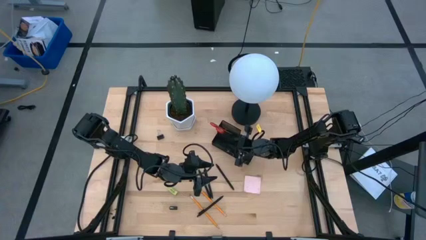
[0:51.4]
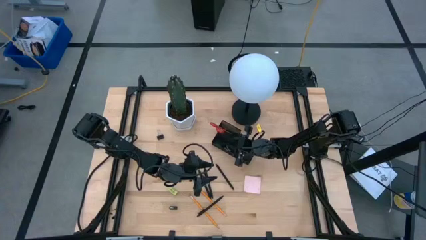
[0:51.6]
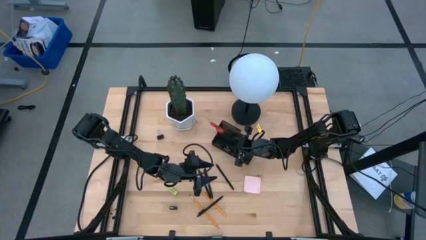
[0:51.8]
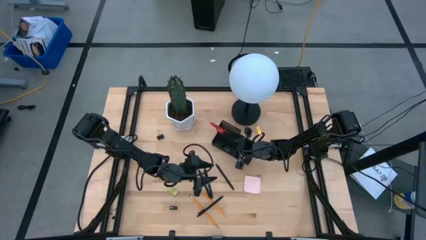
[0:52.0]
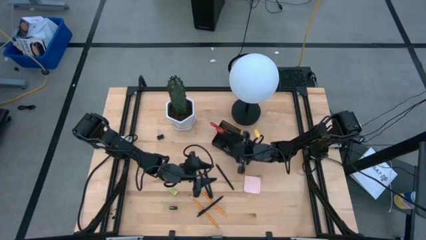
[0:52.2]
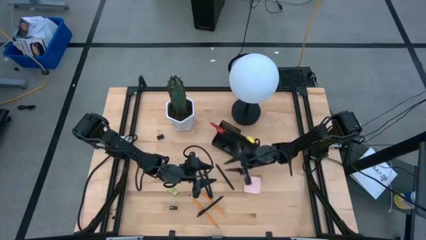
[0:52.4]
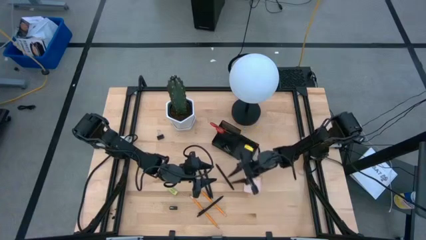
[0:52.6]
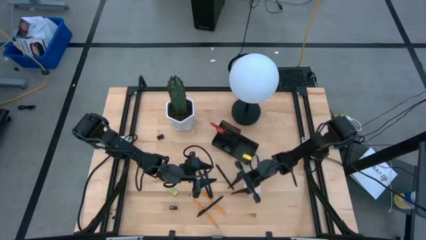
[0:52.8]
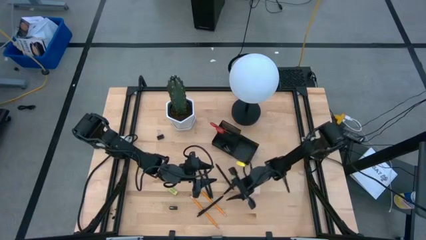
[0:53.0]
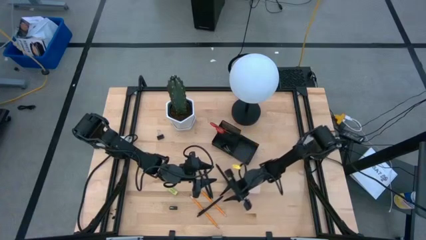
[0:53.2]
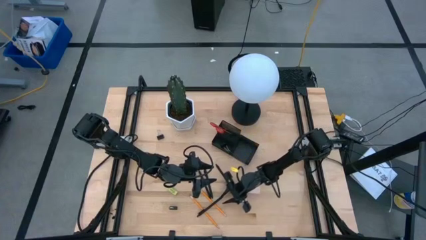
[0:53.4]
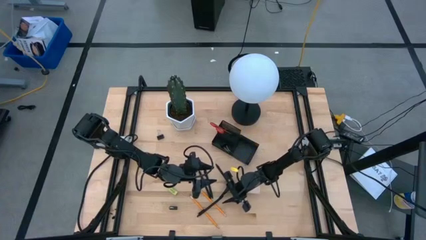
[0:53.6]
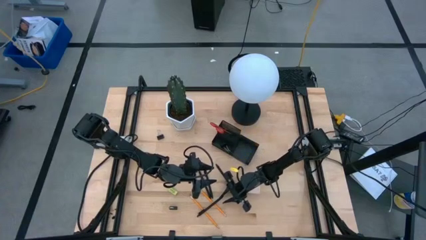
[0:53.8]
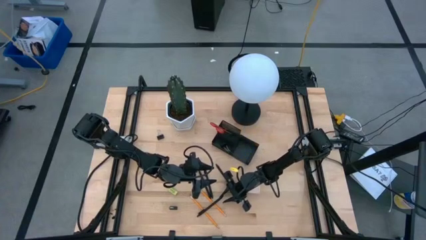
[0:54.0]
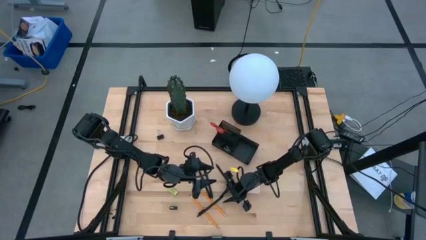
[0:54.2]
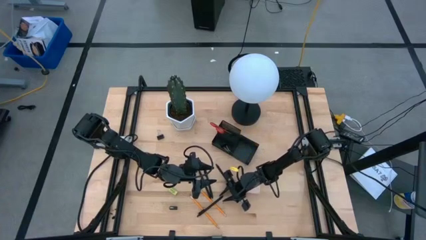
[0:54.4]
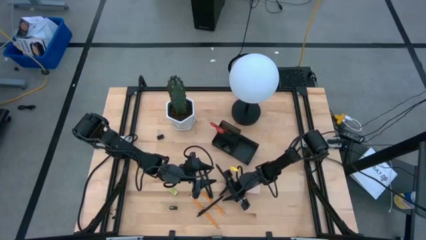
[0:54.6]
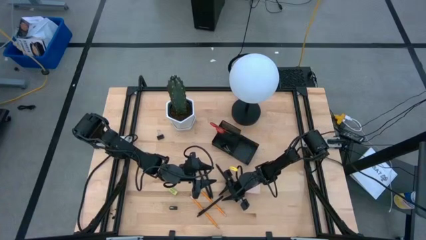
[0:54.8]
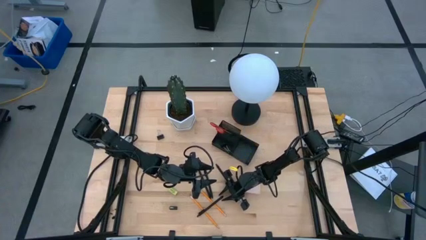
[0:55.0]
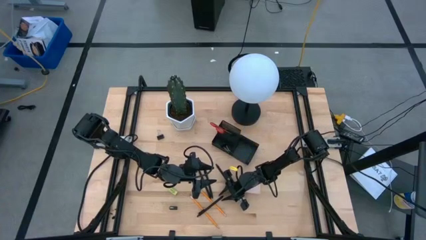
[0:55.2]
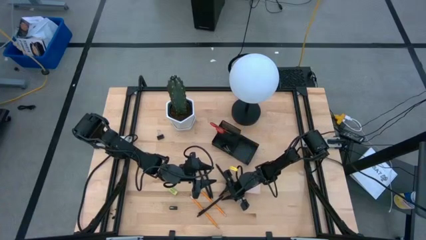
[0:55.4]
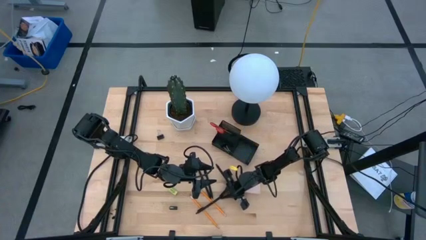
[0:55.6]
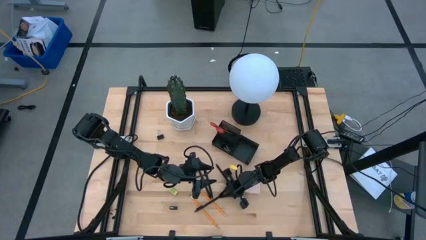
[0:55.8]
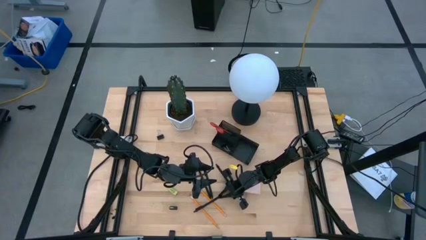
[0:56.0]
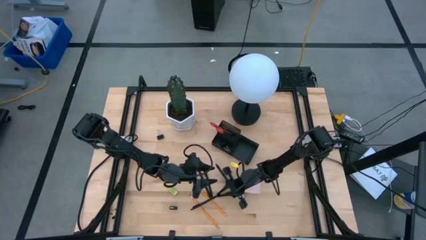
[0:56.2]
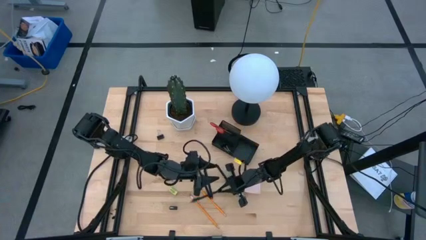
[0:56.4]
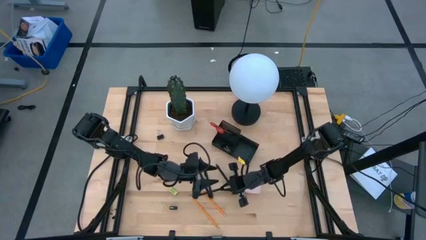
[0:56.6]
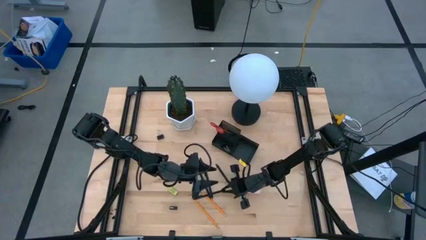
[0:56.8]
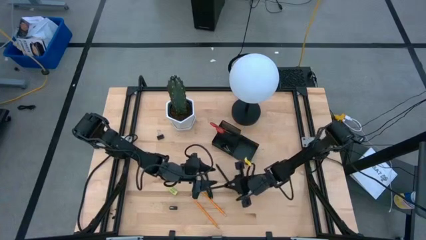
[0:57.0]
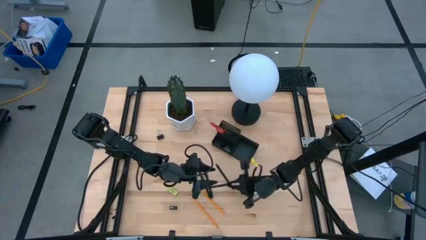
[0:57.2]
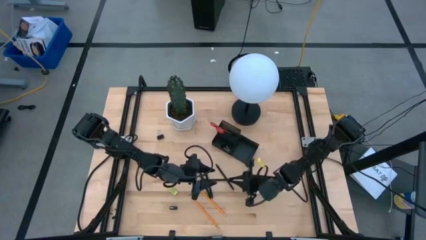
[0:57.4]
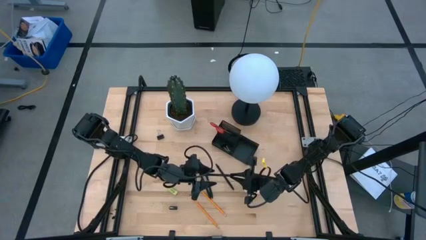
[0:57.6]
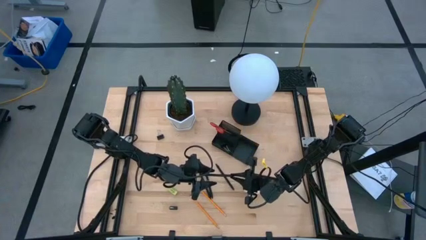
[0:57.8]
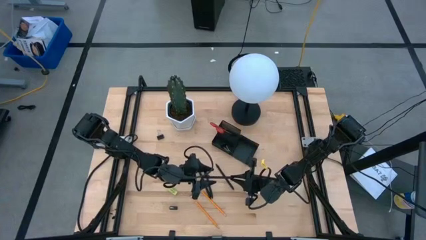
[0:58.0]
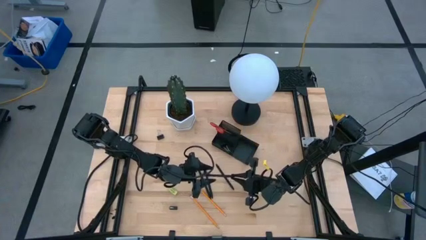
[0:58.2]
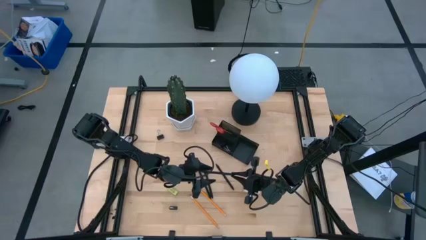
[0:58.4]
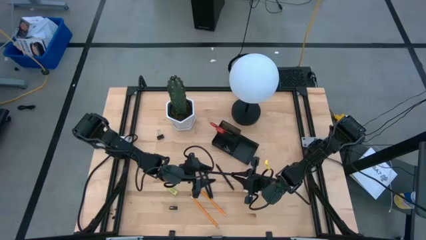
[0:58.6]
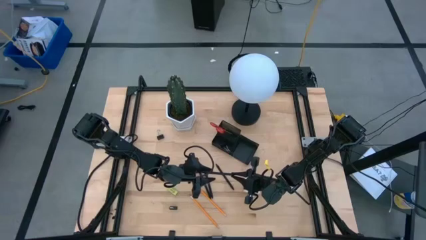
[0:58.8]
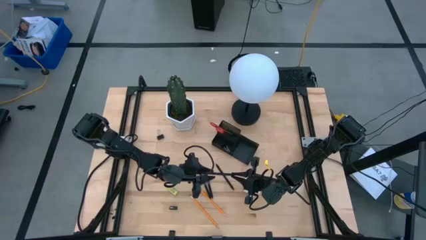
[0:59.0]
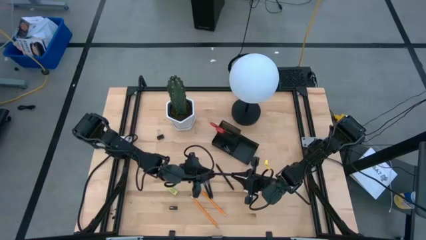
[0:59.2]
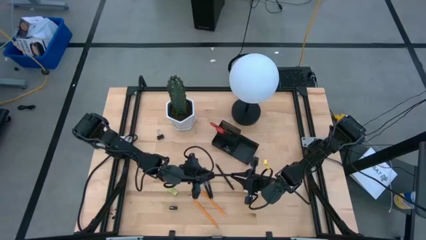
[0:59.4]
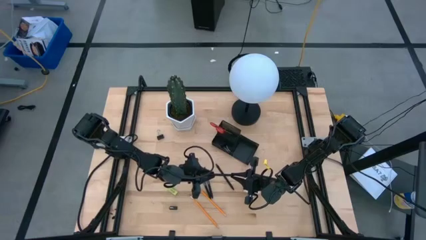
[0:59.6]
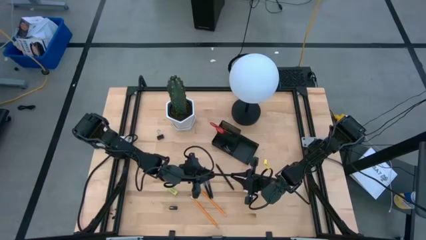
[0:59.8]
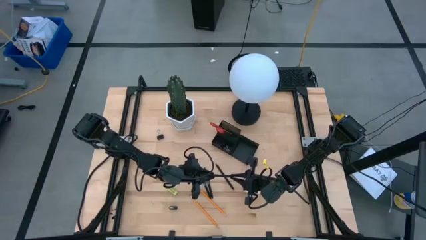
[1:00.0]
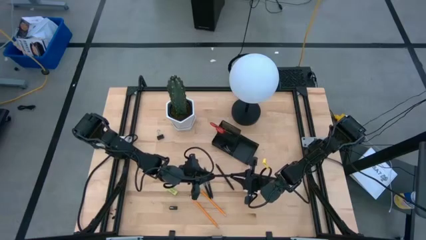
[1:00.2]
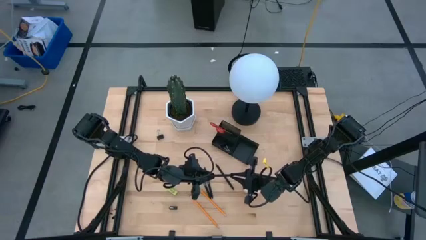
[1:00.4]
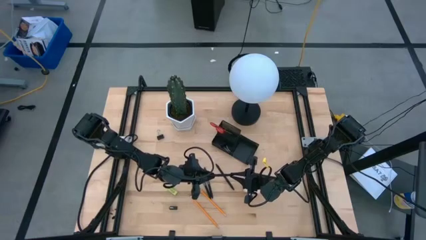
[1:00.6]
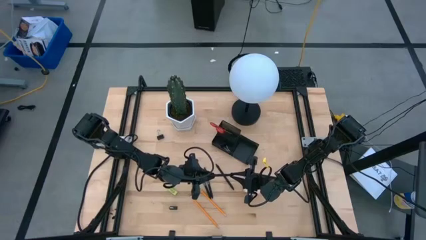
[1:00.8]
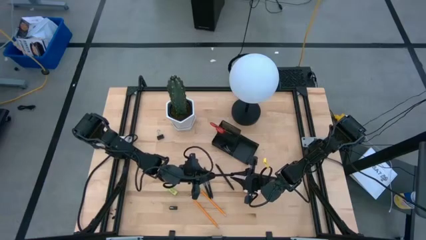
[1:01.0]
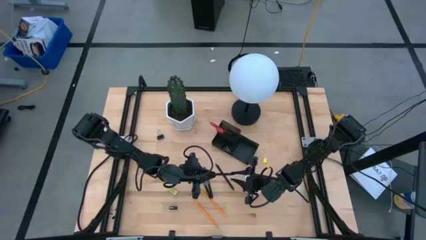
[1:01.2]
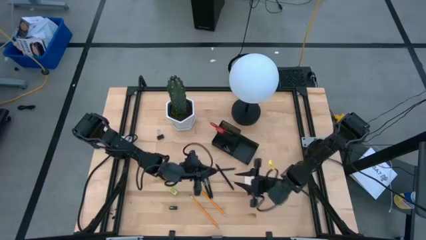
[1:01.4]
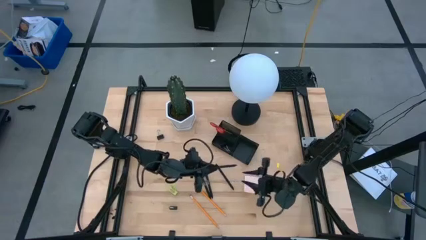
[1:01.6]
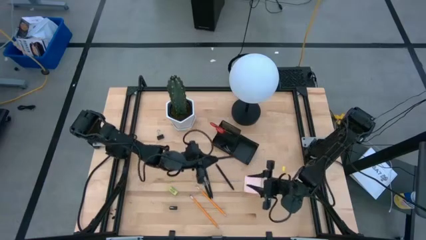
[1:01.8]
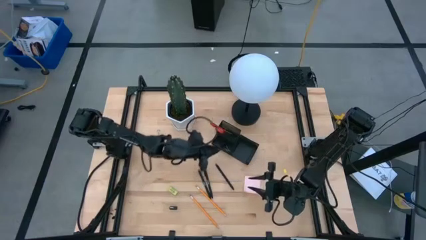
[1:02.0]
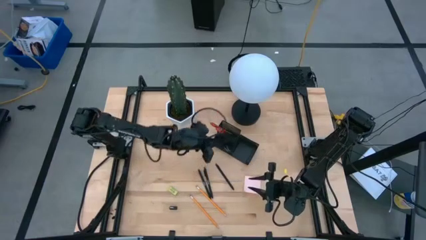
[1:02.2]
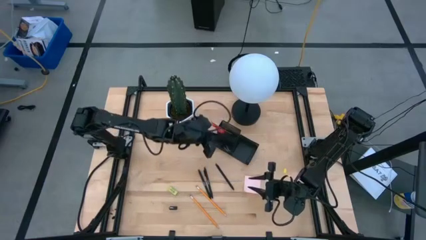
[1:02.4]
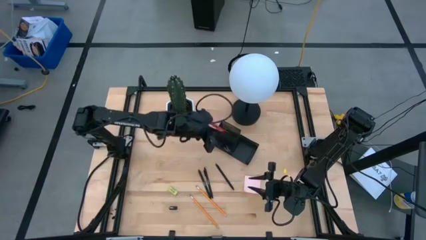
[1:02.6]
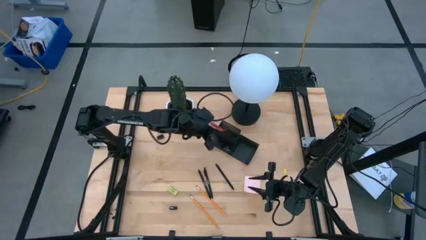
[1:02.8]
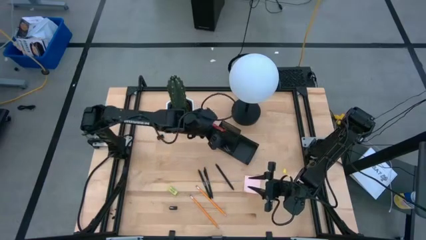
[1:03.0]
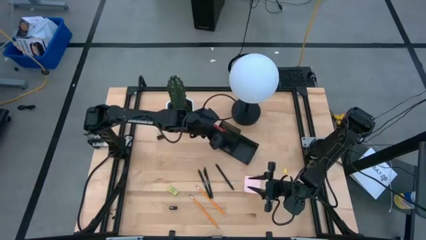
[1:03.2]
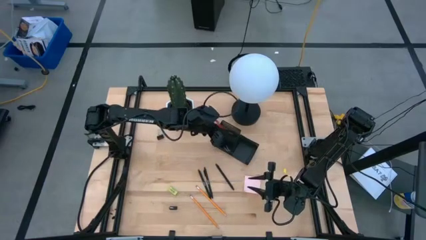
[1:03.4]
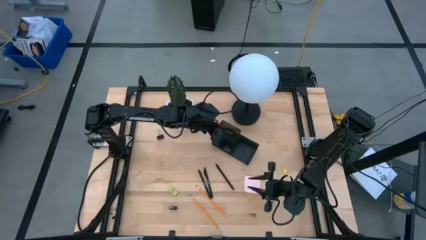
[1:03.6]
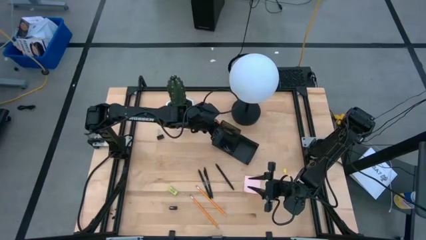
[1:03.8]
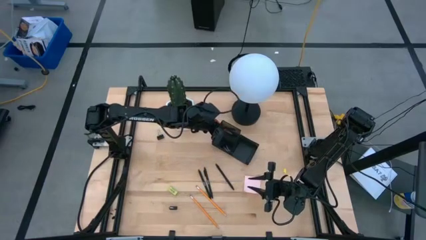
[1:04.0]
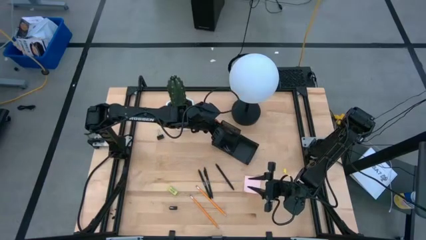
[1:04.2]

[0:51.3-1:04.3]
Task: Pick and place office supplies into organizer
Put the black pen into the black desk organizer

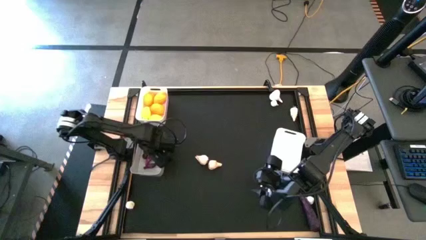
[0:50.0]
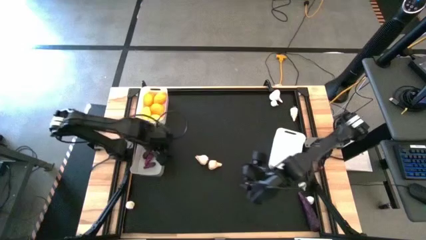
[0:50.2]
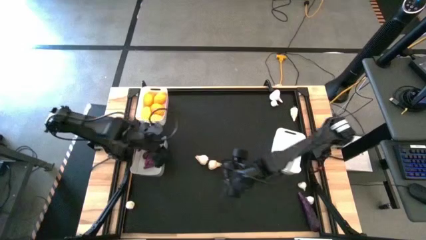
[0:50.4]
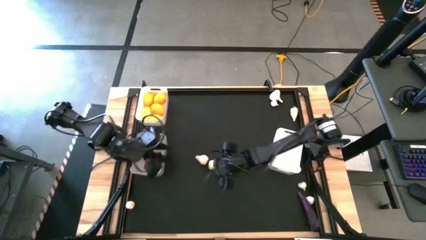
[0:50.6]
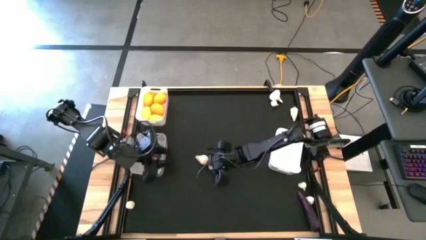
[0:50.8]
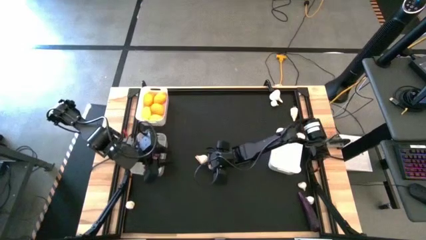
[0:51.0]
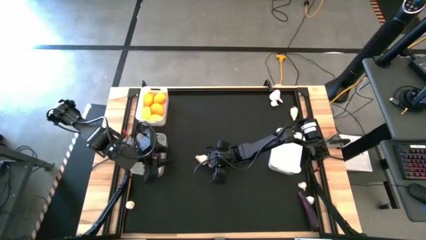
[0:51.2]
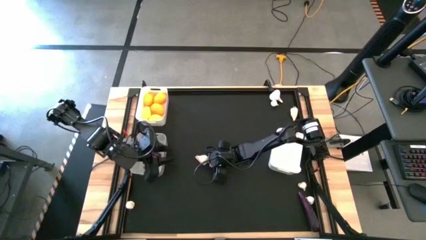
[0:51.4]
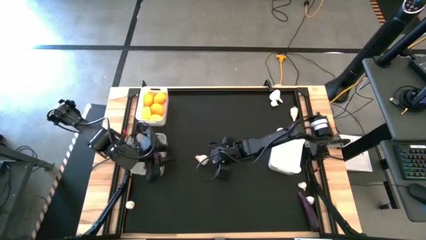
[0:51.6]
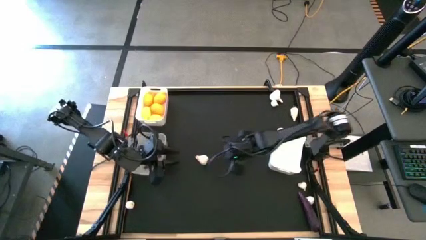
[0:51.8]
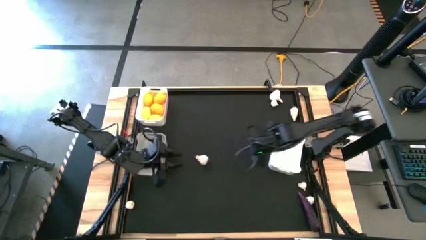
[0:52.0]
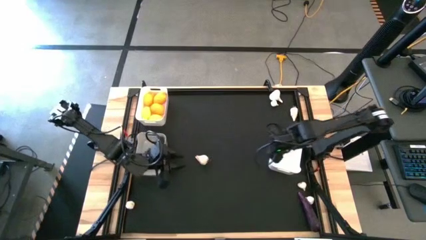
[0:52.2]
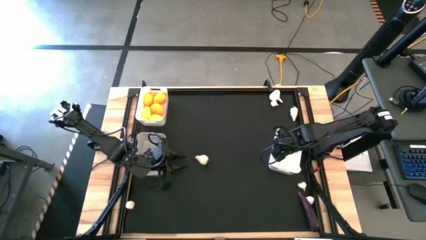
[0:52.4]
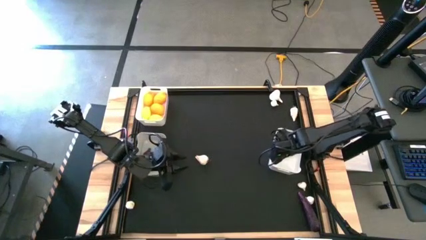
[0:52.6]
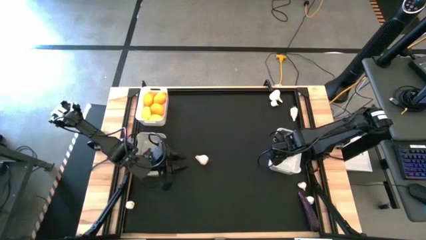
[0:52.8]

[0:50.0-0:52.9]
Task: Sort produce into baskets
Put the white garlic into the bottom white bin

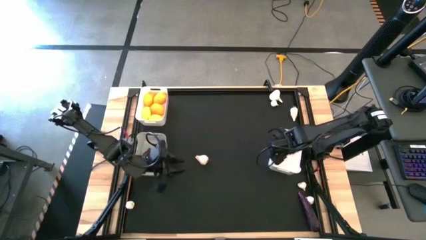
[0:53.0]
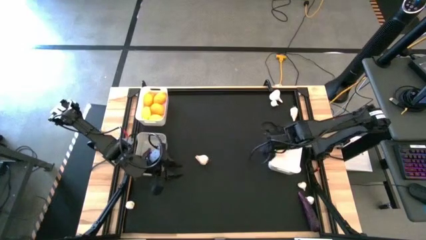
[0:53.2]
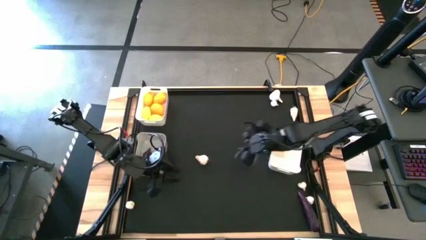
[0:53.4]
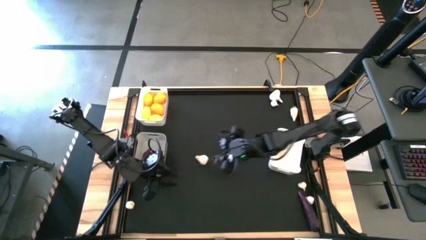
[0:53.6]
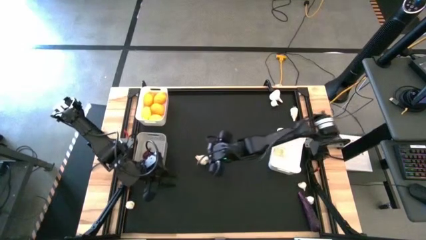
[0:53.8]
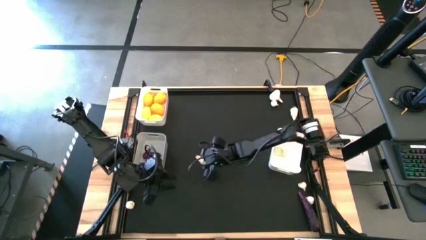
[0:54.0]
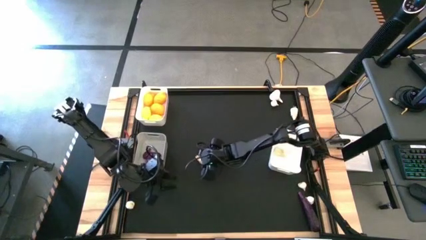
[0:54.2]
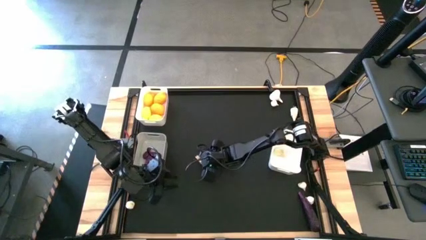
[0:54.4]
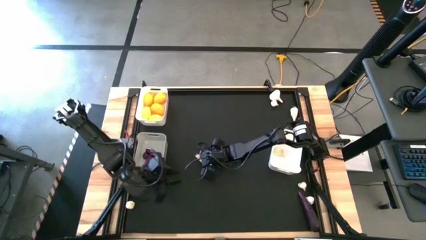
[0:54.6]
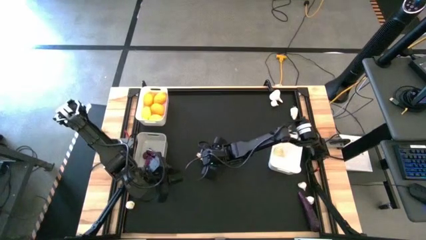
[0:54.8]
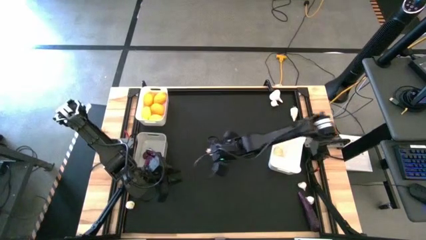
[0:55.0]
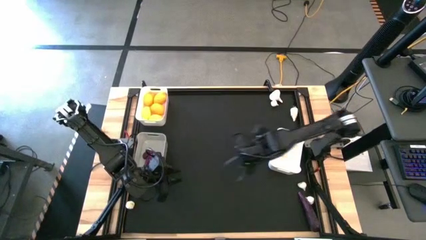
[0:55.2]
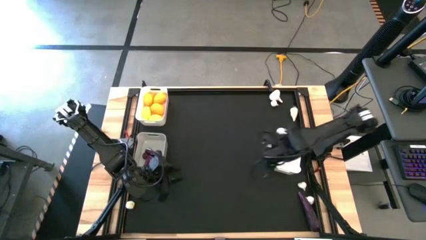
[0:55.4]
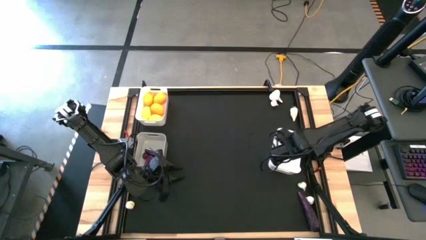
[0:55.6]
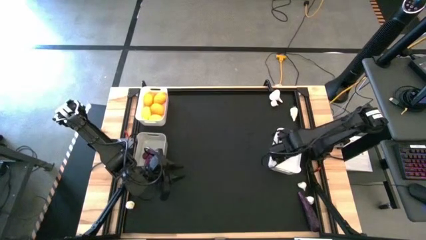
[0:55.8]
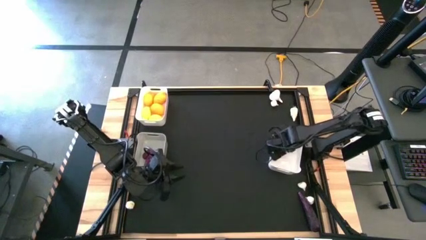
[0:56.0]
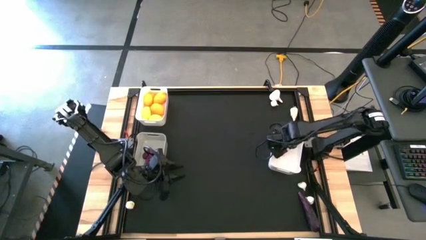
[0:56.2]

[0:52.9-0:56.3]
Put the white garlic into the bottom white bin
